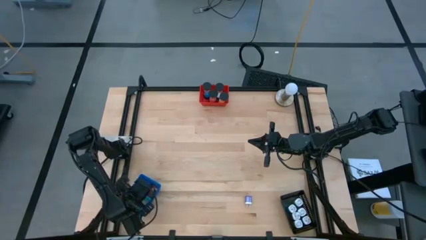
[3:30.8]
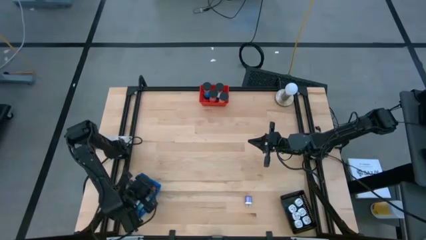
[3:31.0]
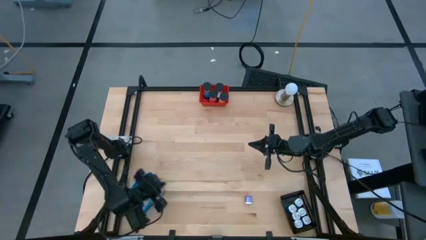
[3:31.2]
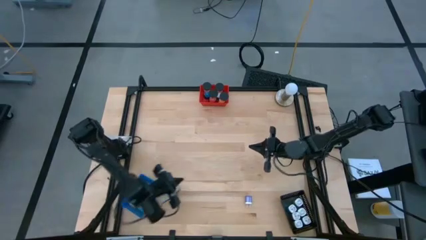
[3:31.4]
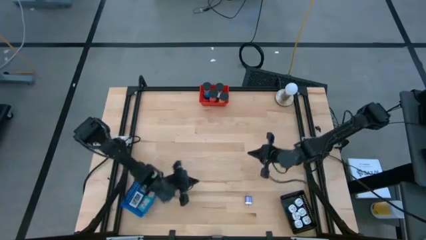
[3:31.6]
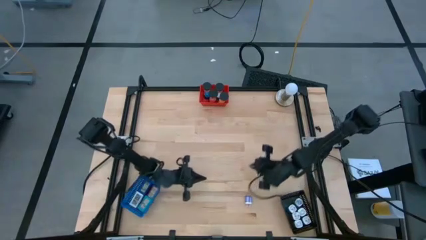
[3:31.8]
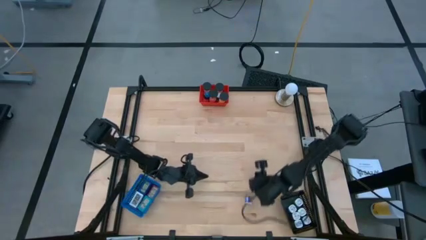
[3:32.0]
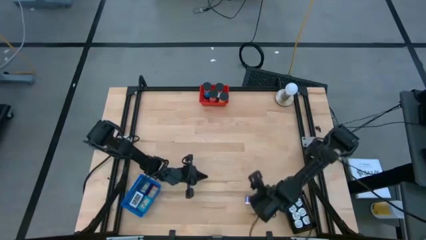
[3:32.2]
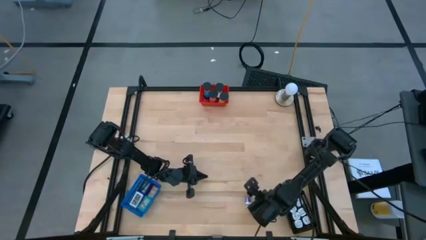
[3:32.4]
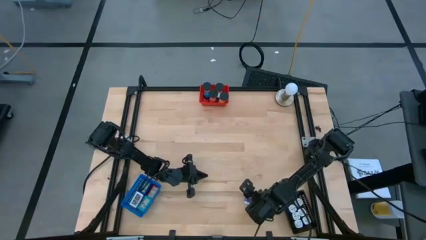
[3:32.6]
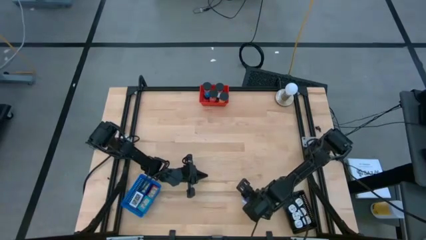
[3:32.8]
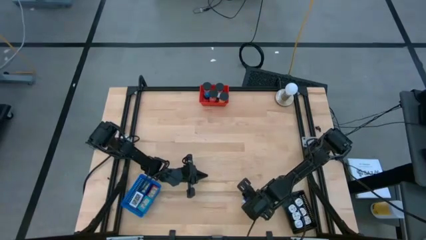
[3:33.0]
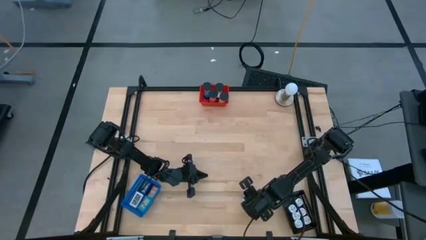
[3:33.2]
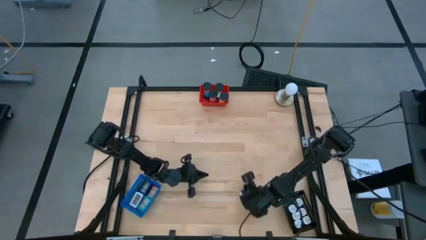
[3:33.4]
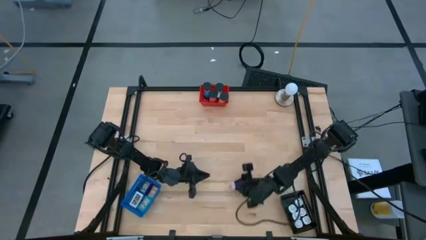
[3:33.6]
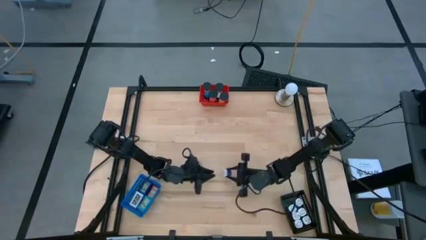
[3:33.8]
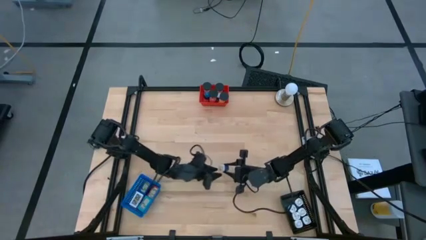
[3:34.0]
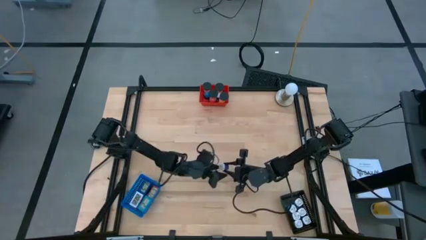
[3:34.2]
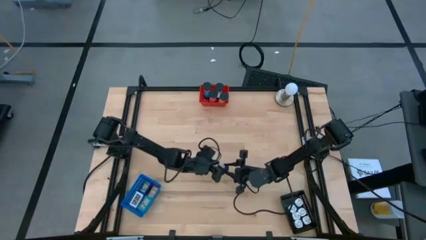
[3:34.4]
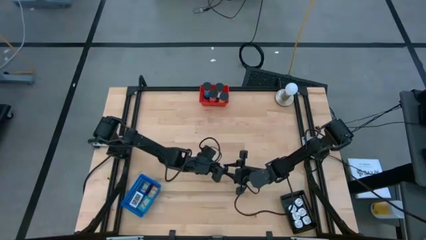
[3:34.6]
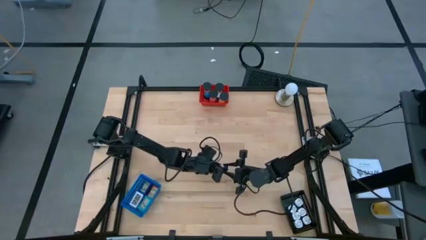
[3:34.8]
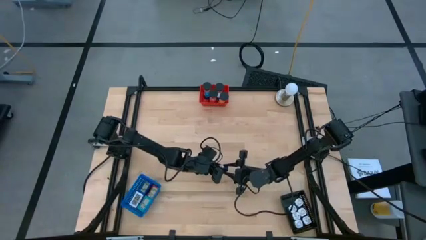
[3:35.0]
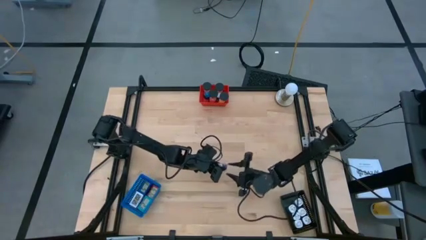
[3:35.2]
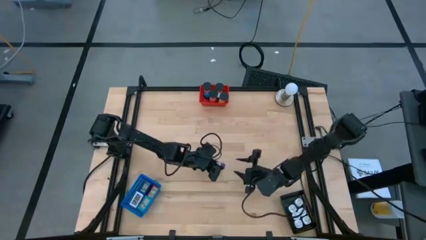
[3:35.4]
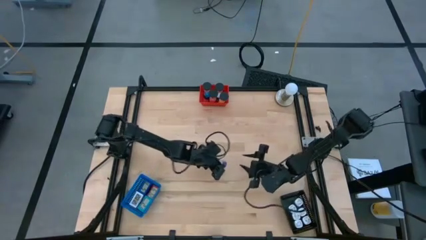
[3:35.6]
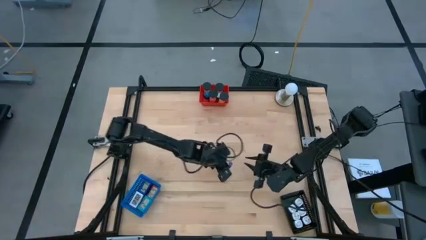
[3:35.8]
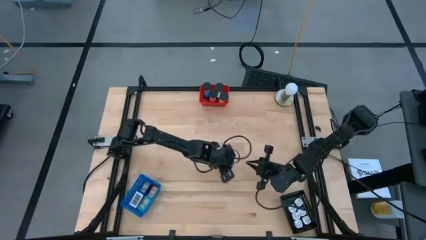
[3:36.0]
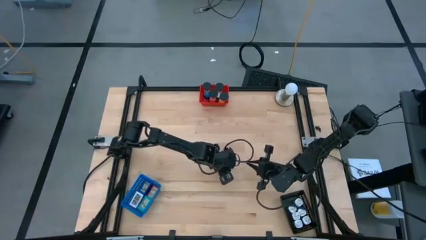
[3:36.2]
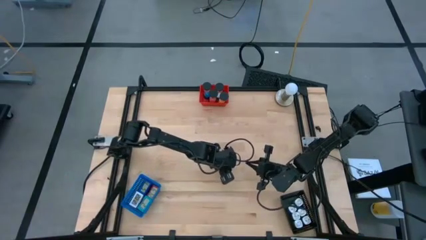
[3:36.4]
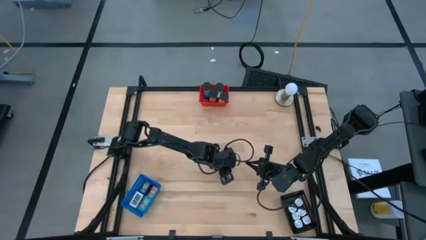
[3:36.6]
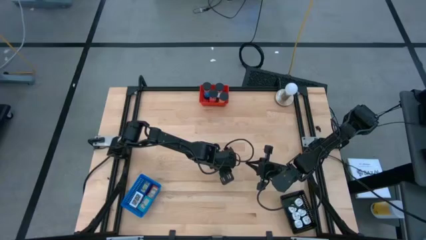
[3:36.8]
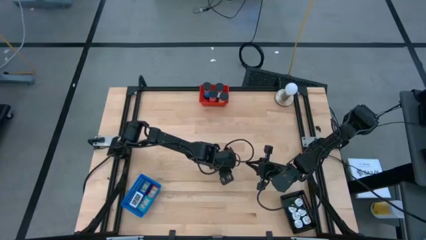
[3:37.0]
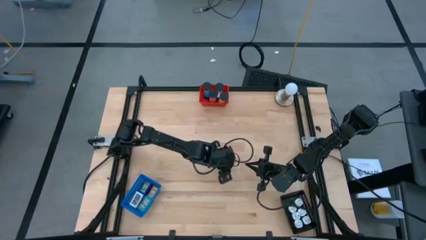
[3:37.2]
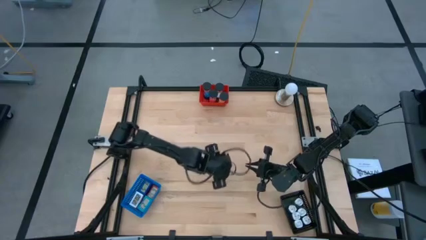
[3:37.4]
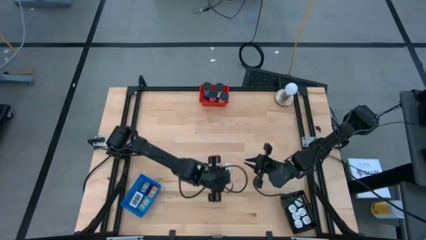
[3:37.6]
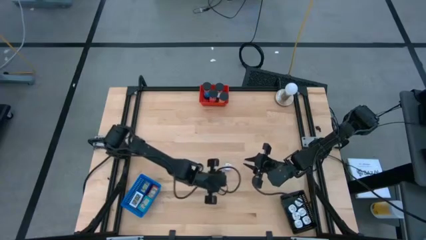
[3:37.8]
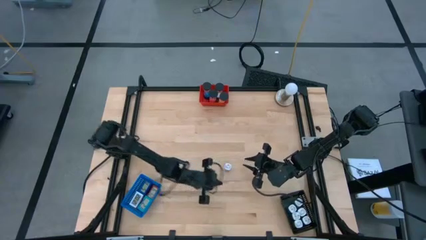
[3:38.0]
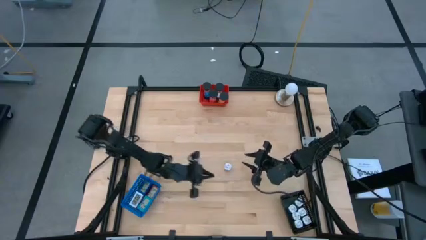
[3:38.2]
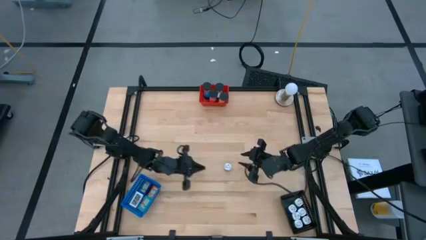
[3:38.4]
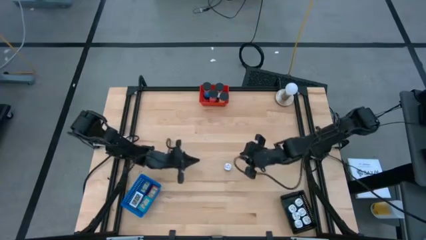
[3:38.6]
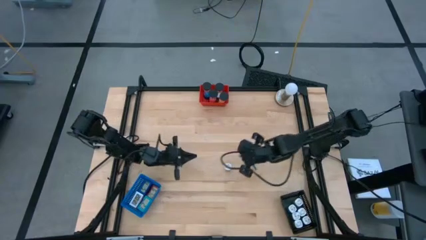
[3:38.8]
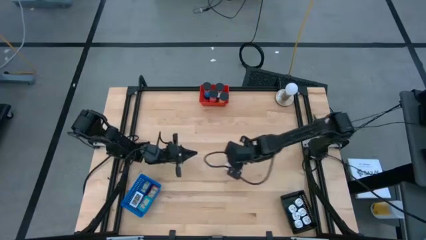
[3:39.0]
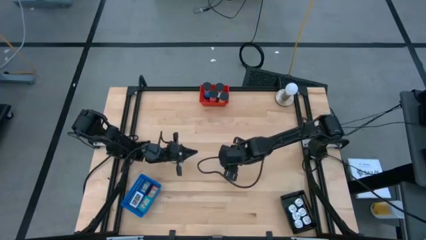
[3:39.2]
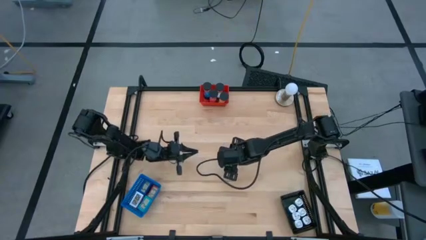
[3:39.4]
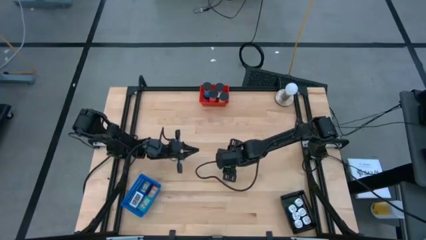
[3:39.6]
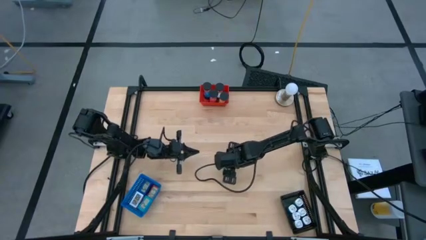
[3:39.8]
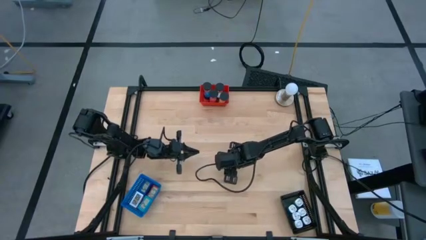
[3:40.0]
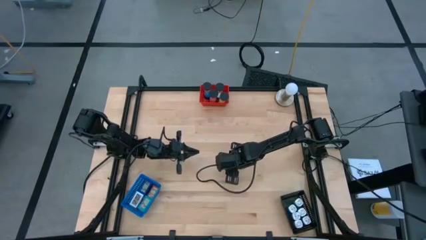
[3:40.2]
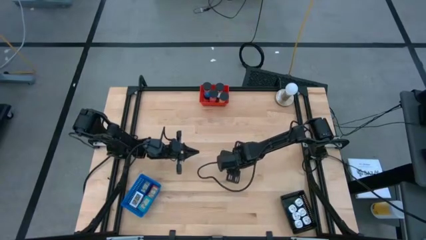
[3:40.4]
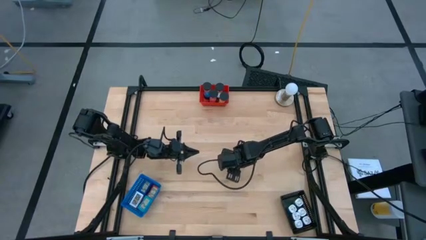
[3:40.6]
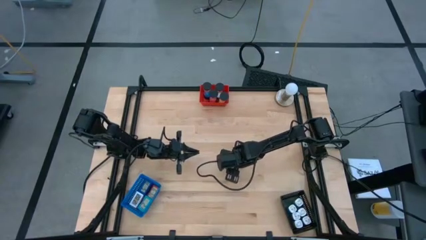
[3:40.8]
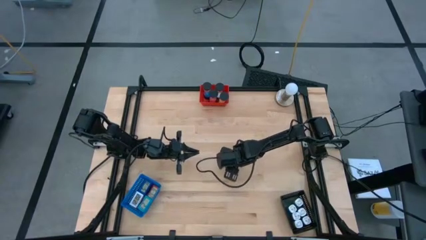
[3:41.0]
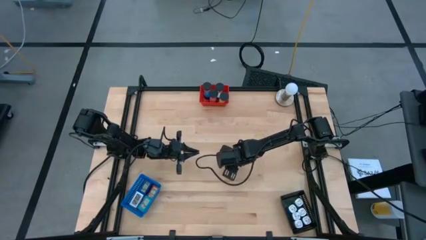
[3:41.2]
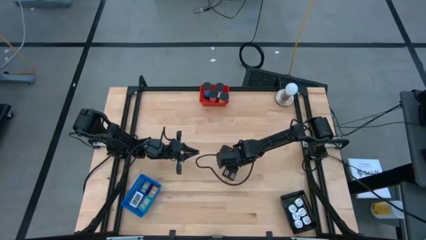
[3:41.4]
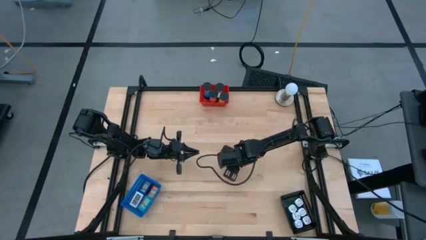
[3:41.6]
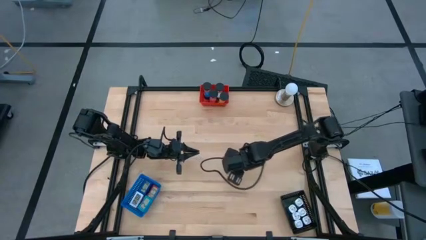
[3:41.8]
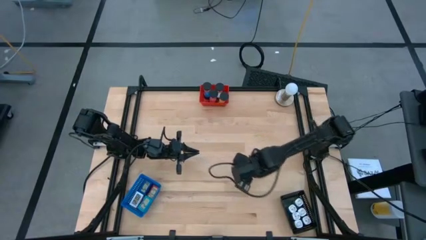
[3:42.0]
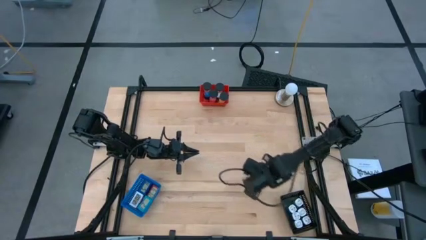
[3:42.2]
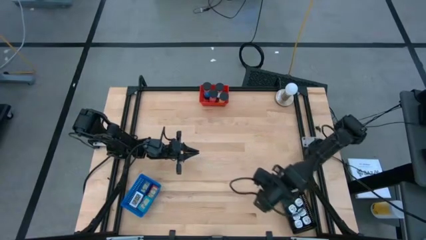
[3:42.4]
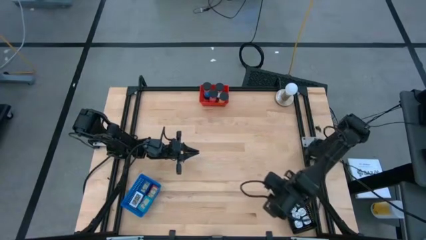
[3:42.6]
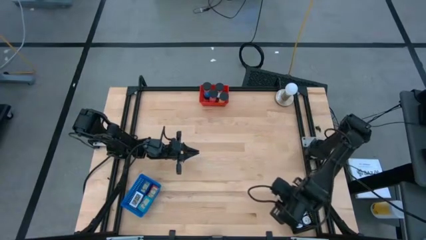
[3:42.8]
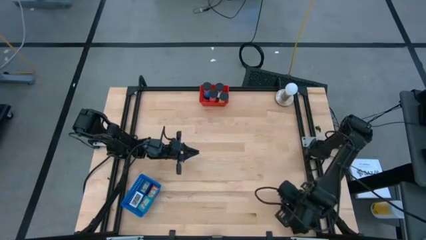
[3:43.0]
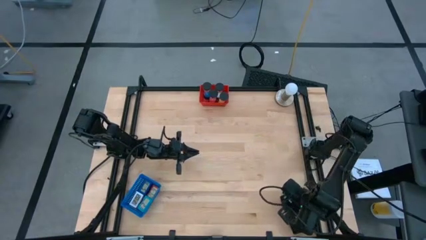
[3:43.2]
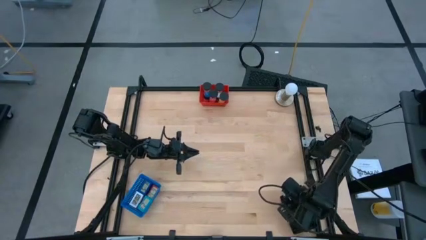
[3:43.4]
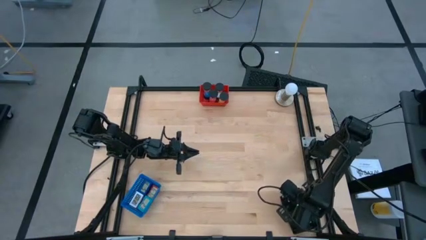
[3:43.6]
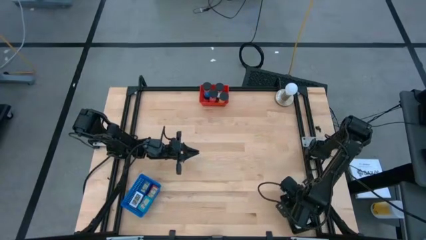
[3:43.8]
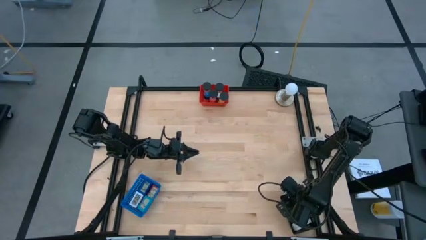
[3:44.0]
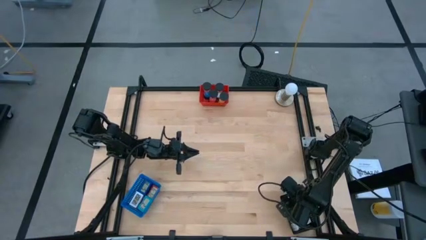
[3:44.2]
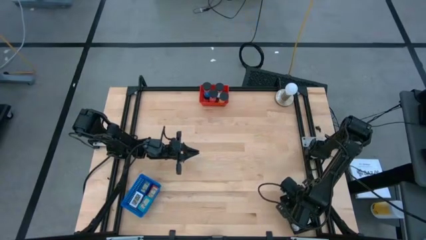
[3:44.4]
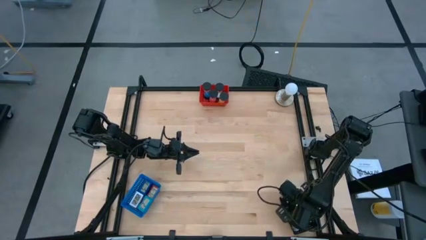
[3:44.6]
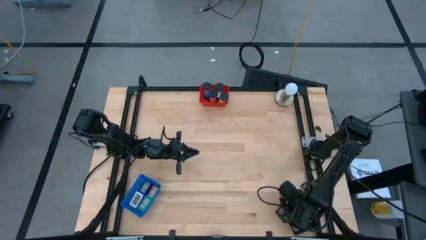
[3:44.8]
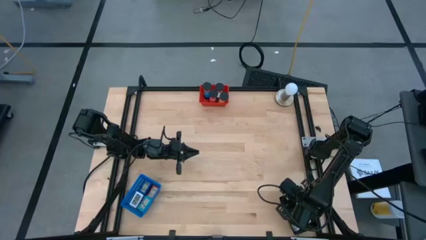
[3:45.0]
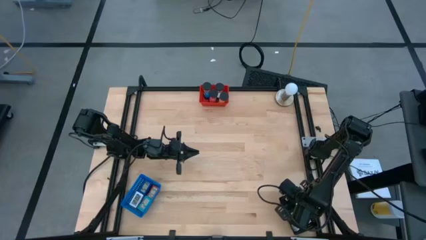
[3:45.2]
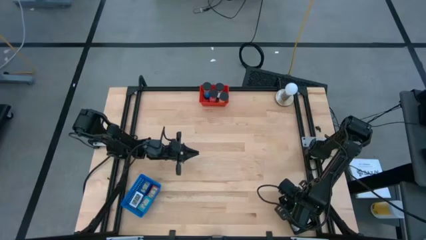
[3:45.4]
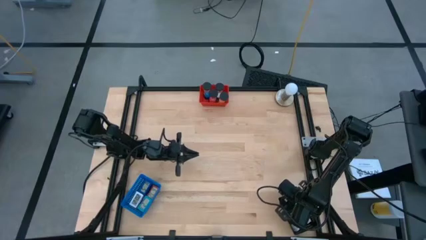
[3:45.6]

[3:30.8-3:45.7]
Task: Pick & Place Office items
Put the dark blue charger adapter into the black bin
